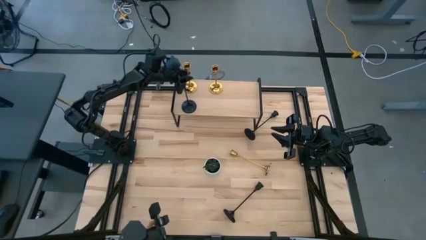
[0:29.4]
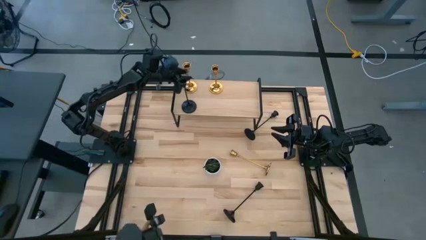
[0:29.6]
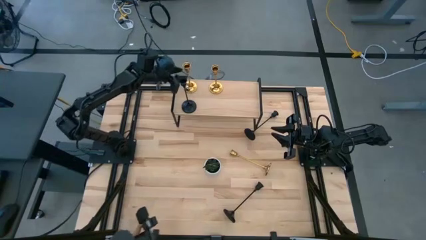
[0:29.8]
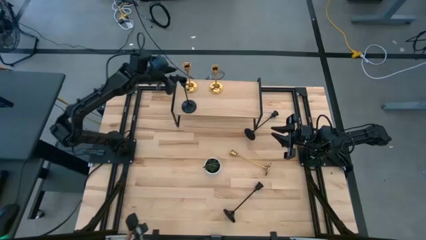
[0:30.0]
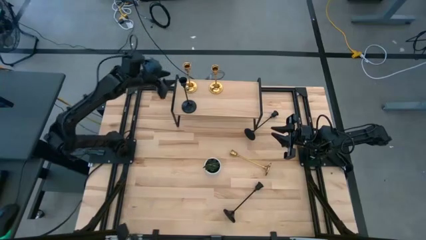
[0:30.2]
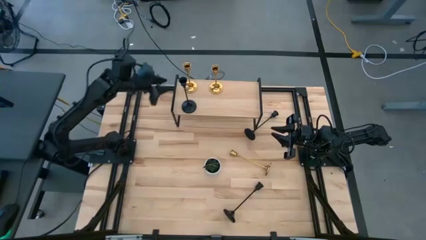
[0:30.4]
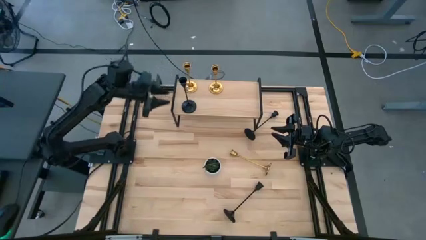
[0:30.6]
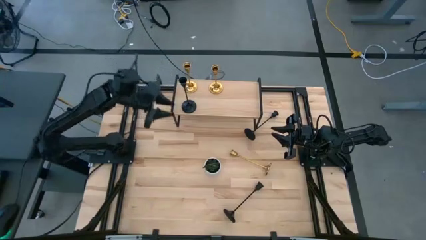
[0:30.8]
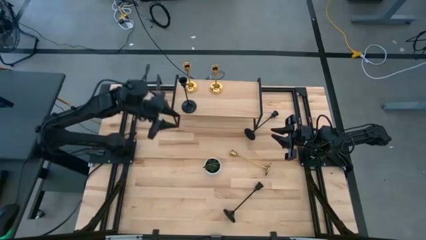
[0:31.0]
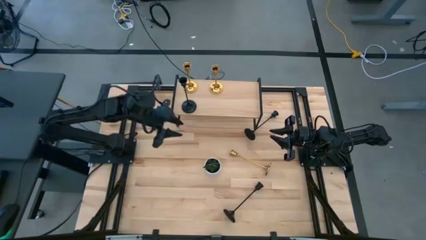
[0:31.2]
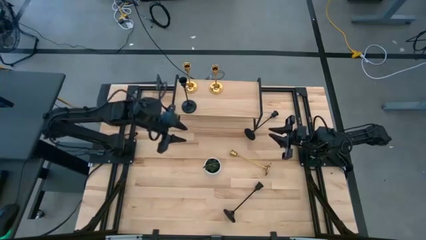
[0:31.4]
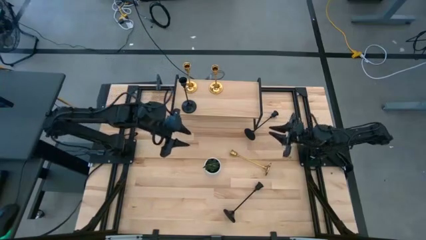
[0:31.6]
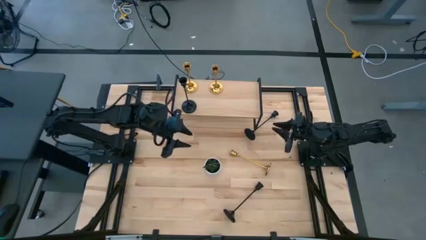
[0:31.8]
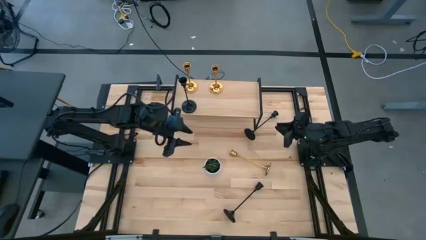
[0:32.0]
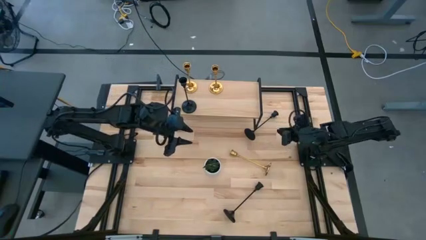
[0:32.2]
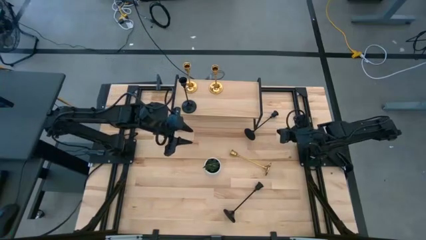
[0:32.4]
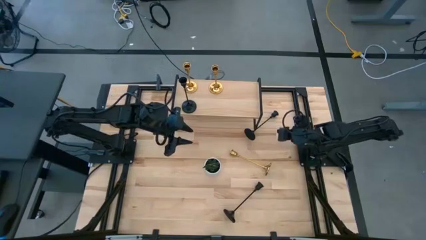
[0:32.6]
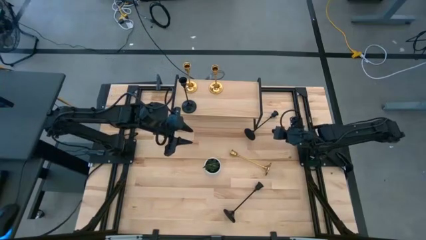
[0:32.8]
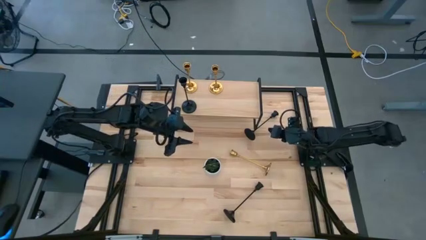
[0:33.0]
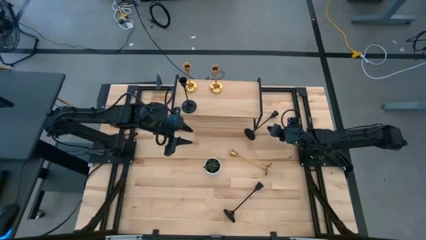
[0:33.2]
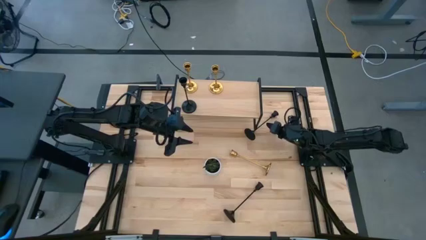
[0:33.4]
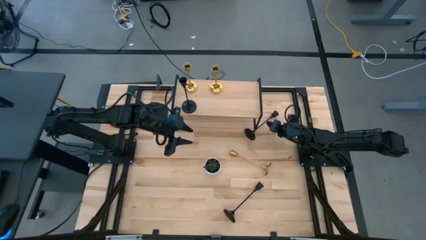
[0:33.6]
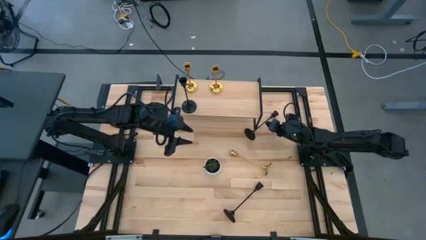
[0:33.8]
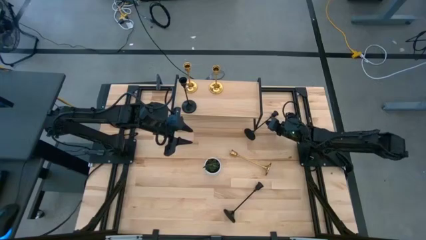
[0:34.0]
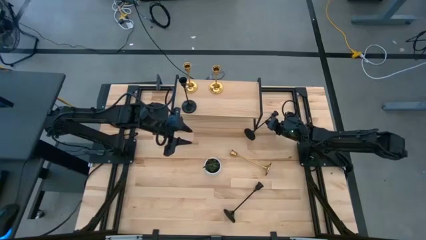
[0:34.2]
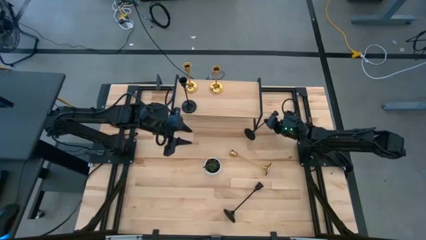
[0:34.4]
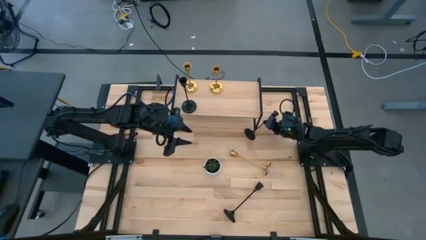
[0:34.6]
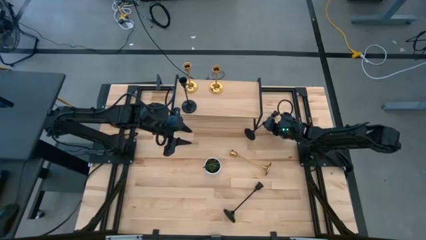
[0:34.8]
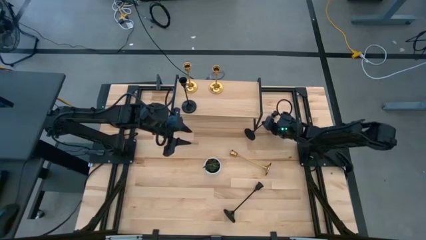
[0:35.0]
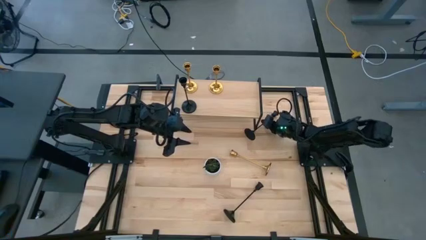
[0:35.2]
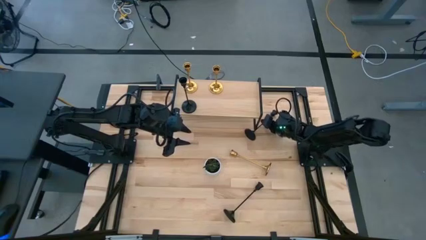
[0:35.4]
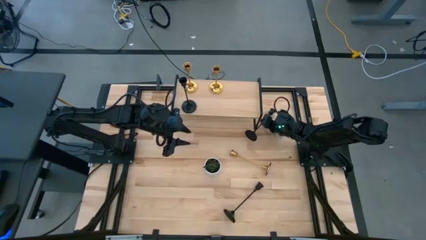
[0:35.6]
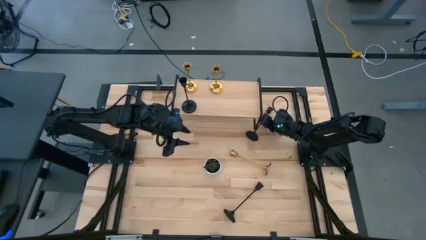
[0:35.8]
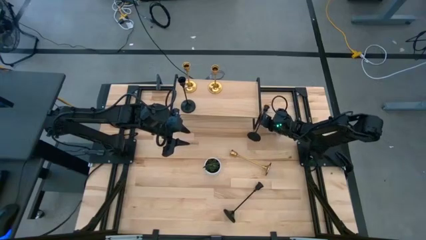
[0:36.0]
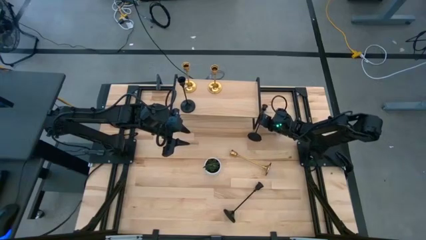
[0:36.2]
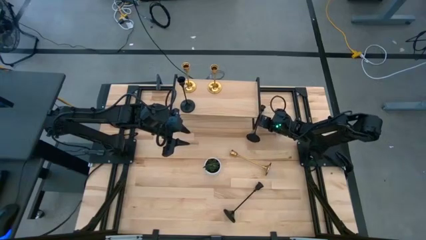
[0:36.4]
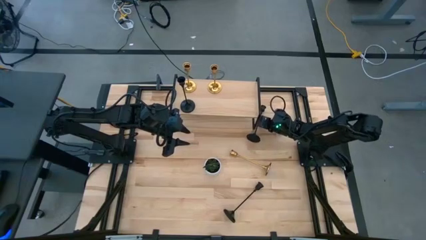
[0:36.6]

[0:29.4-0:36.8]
Task: Pick & Place candle stick holders
Put the top black candle holder on the shelf aligned with the other black candle holder

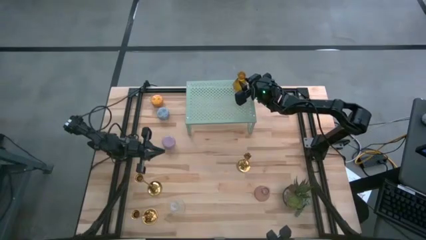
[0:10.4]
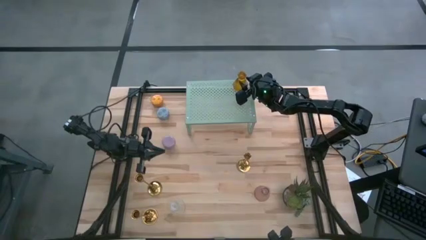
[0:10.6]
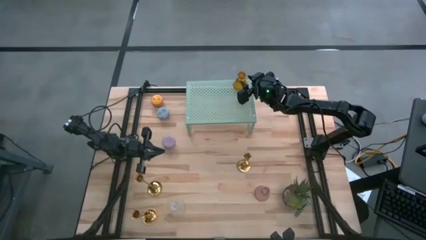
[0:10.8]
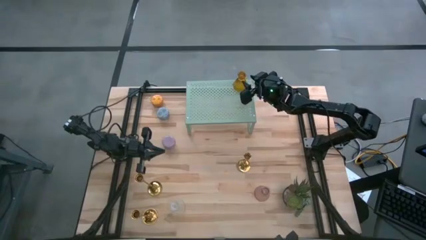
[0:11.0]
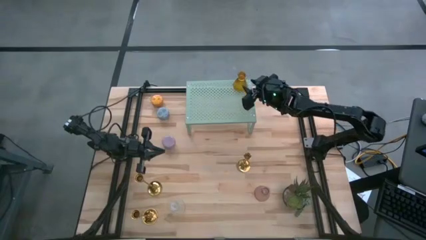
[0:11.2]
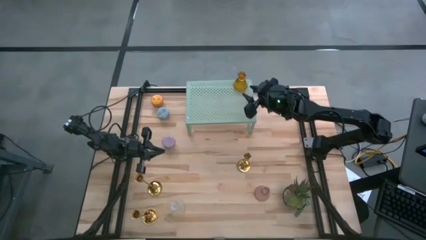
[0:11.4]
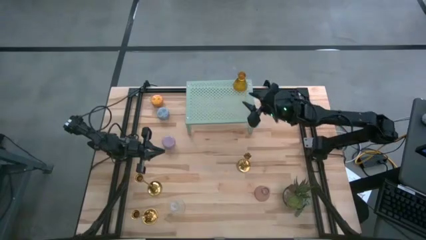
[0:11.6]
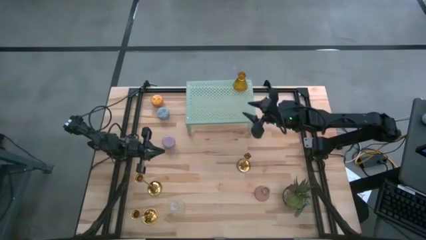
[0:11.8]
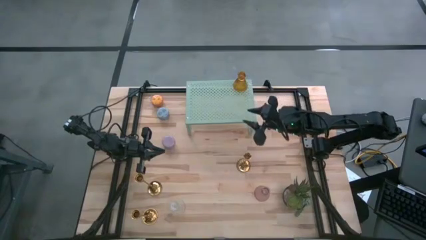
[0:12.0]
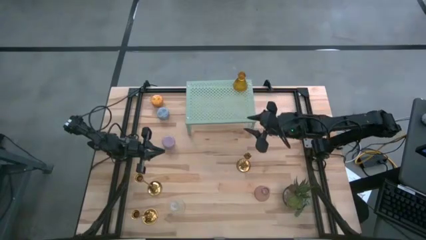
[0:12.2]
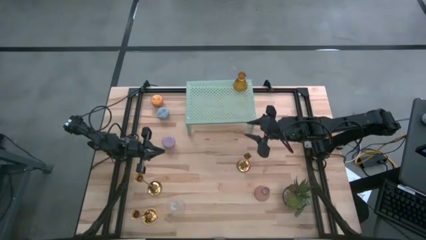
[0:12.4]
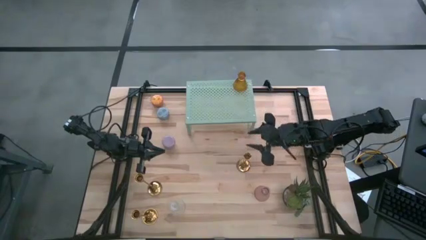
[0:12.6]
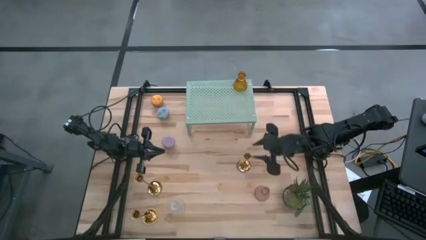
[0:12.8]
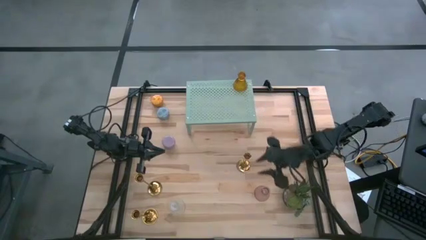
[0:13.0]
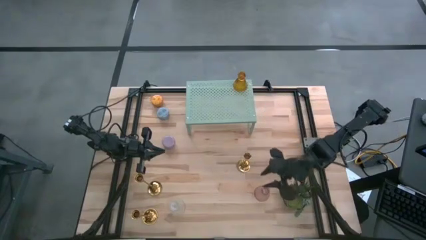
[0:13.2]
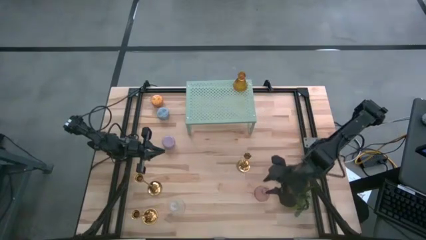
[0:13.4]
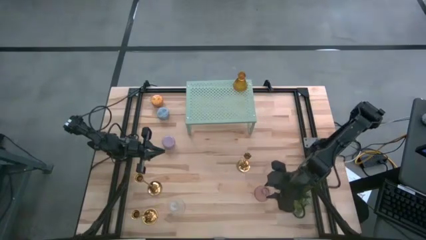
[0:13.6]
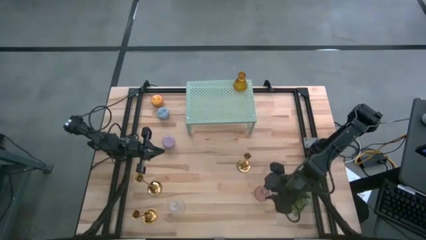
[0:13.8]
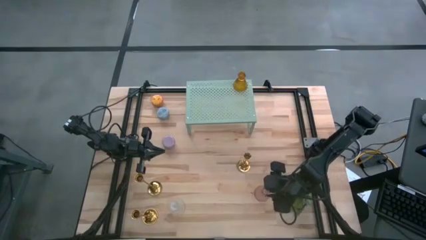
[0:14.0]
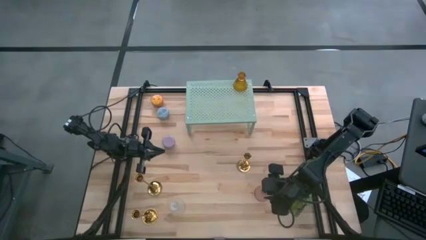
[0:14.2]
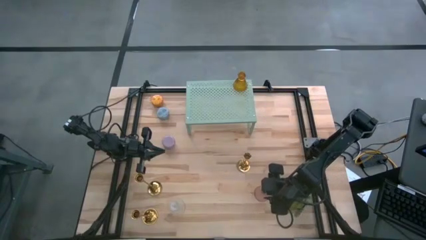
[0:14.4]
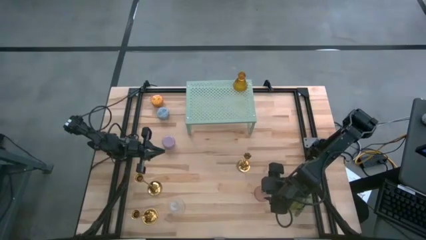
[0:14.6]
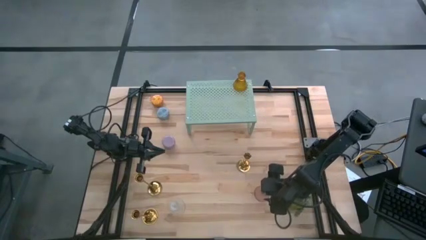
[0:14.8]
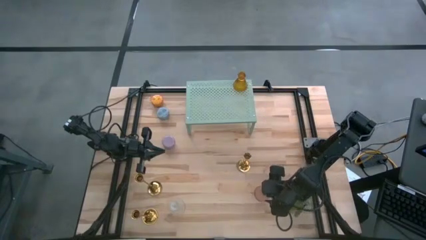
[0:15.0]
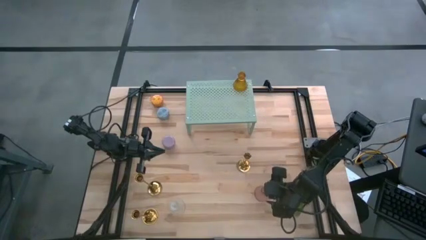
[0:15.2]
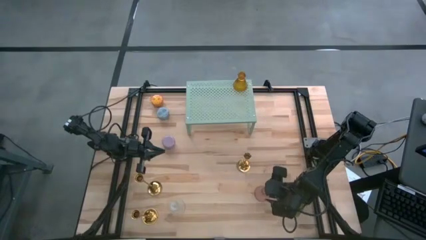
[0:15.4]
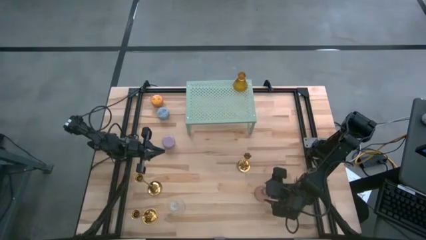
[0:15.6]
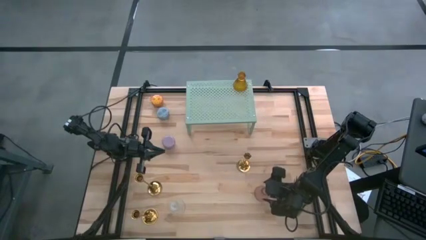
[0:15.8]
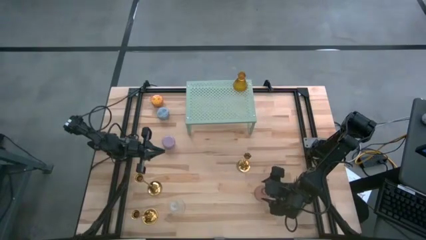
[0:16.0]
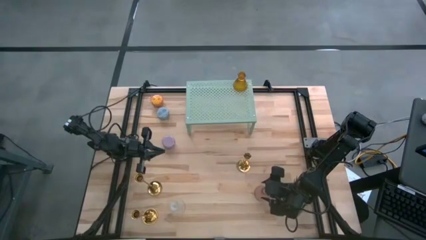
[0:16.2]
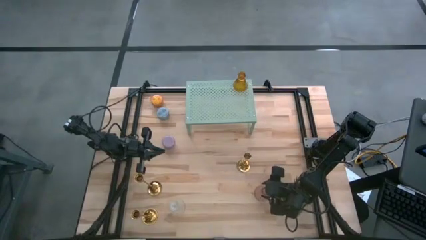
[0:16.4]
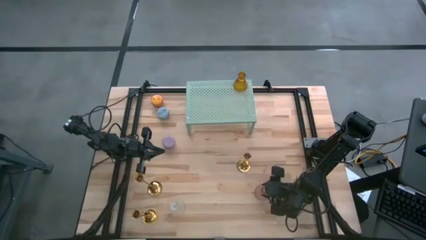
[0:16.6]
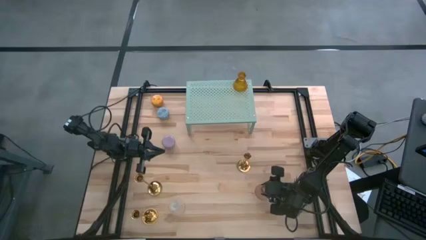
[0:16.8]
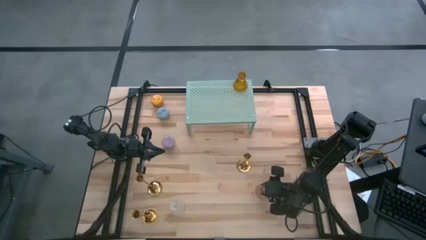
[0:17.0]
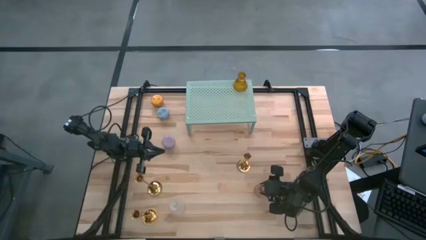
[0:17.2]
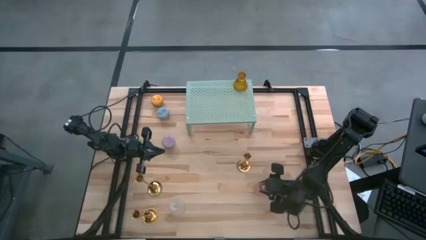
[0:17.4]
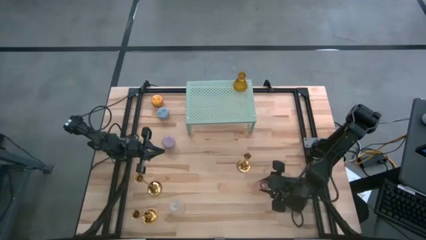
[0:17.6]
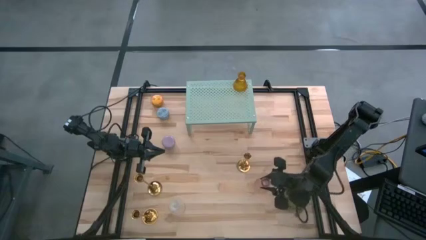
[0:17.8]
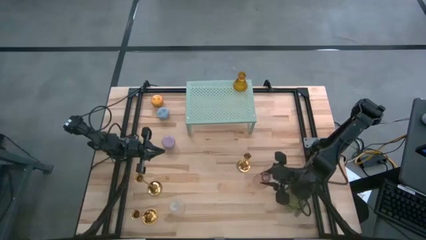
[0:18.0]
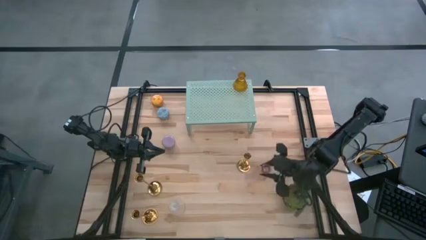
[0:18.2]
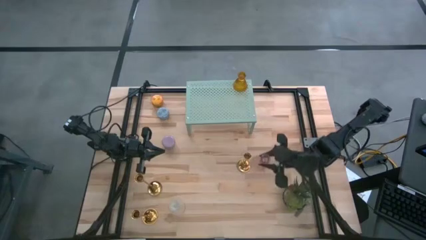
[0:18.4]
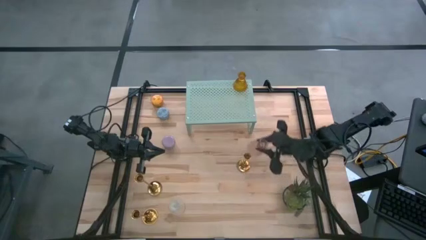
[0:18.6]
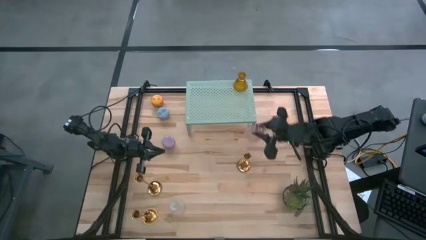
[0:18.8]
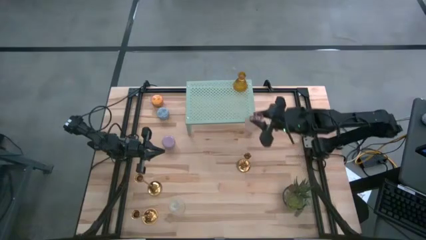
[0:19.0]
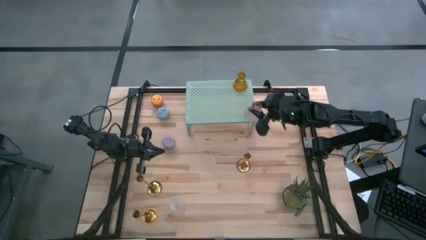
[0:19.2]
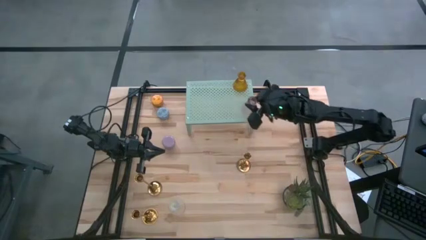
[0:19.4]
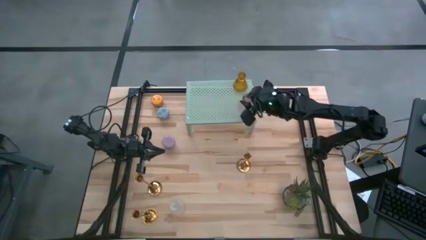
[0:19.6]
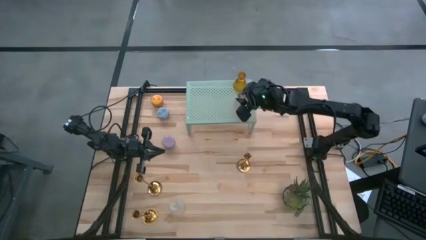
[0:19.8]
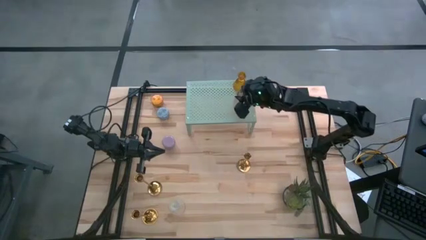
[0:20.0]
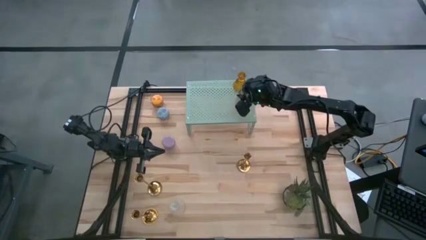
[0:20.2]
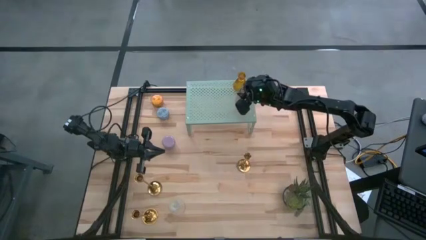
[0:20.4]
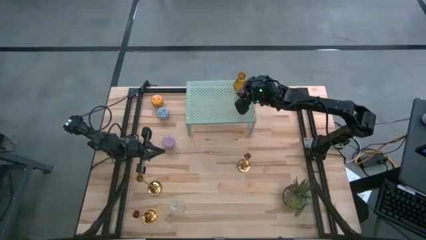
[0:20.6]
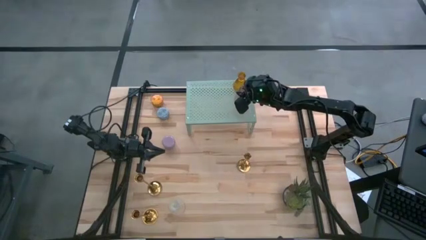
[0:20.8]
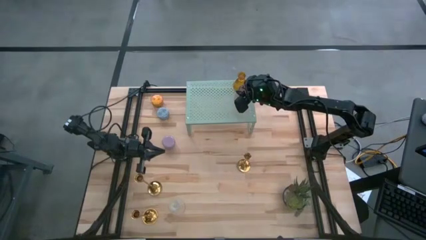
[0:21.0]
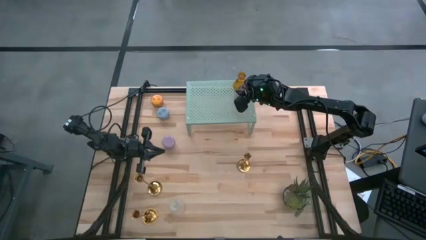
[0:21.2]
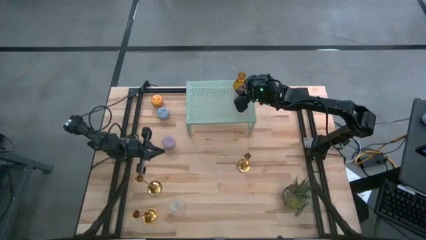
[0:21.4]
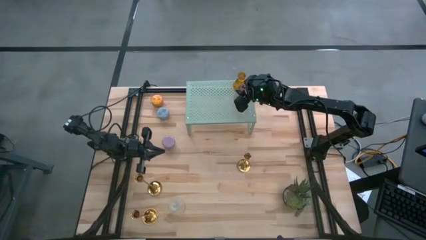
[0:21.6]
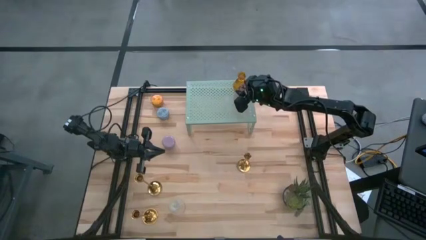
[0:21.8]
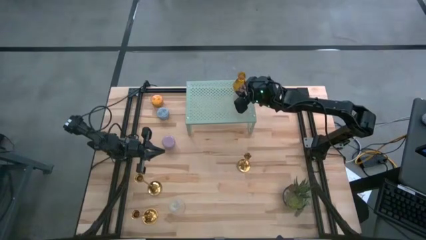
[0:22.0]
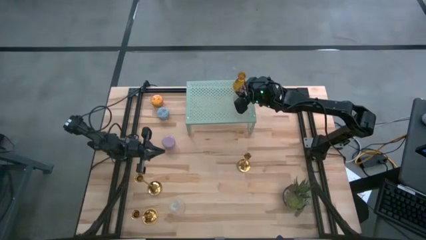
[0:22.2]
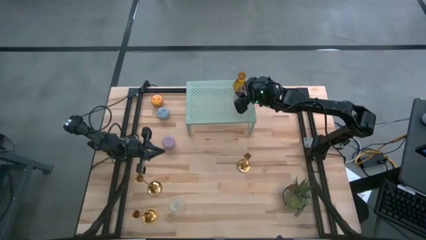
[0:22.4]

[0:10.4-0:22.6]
Task: Pick & Place candle stick holders
Put the pink candle holder on the shelf
